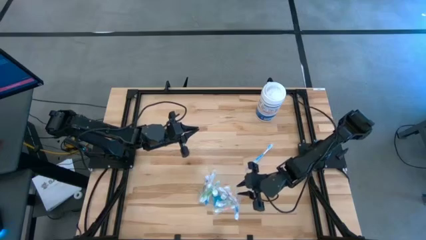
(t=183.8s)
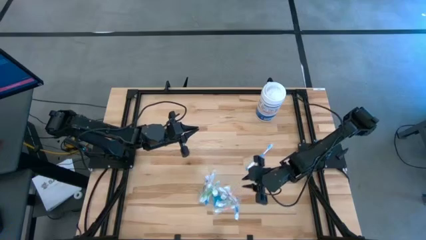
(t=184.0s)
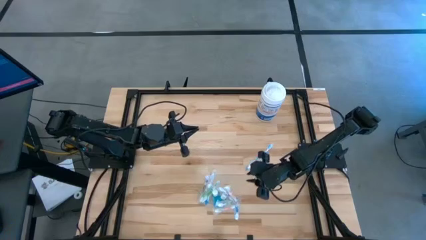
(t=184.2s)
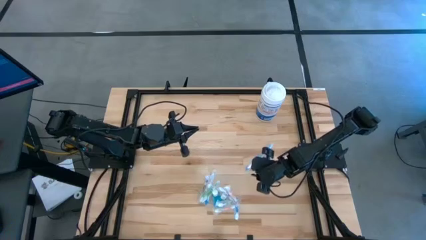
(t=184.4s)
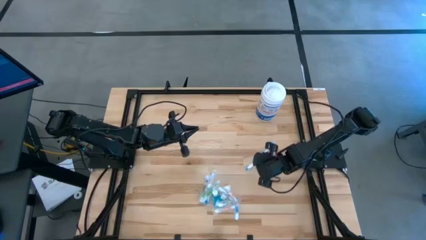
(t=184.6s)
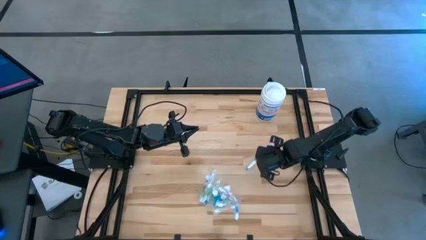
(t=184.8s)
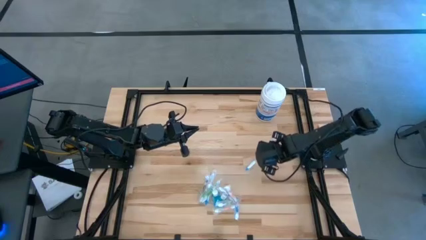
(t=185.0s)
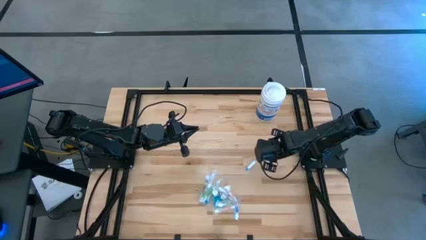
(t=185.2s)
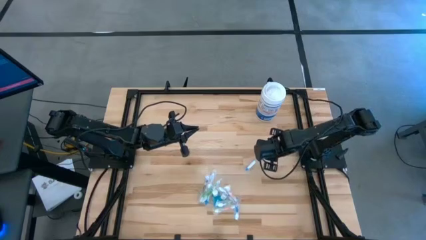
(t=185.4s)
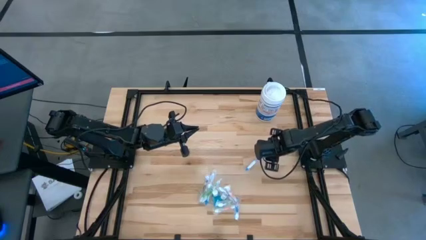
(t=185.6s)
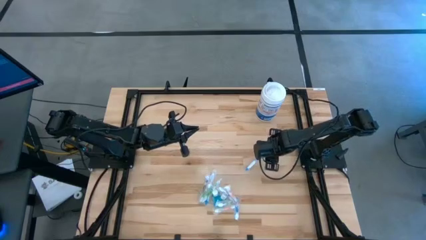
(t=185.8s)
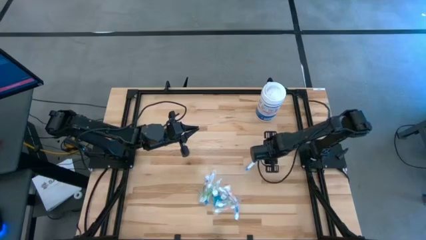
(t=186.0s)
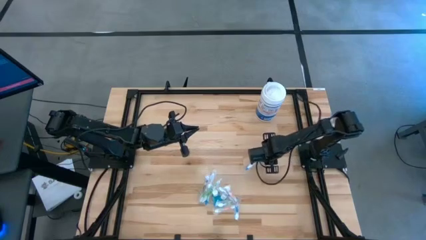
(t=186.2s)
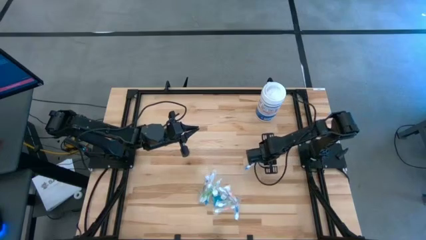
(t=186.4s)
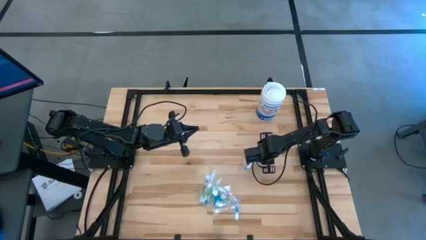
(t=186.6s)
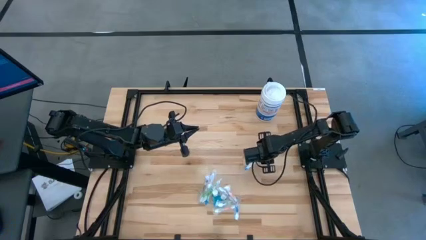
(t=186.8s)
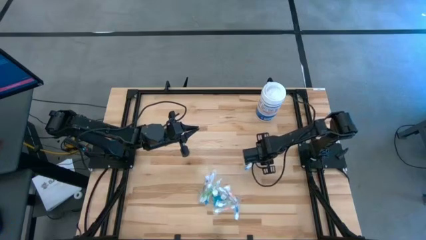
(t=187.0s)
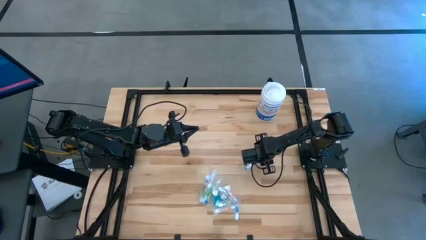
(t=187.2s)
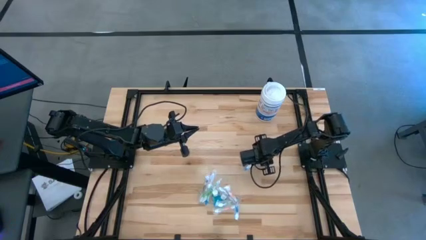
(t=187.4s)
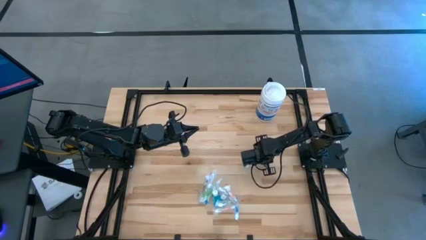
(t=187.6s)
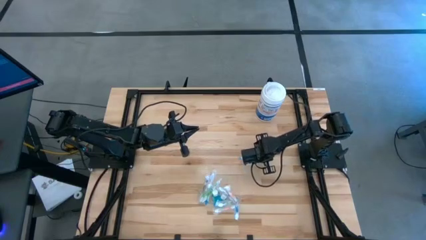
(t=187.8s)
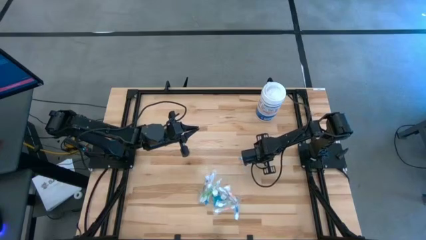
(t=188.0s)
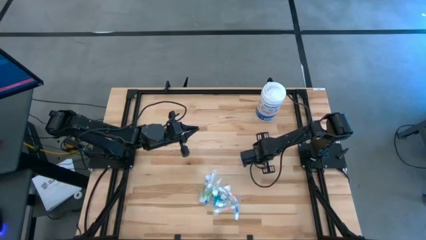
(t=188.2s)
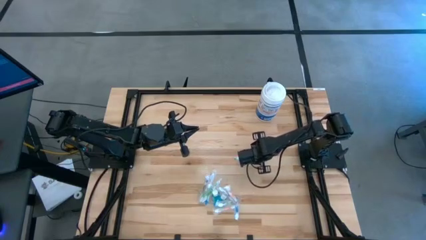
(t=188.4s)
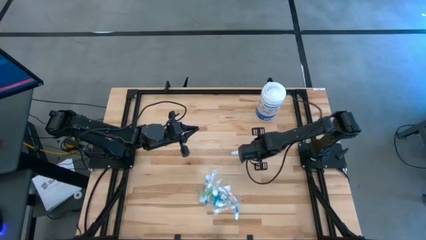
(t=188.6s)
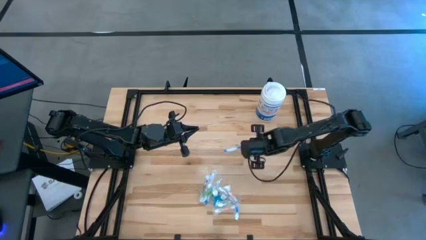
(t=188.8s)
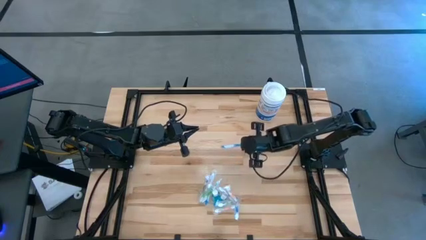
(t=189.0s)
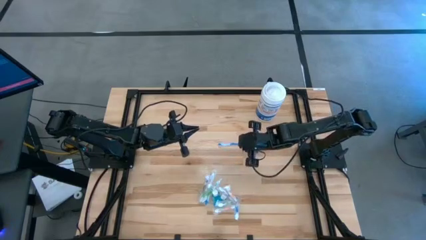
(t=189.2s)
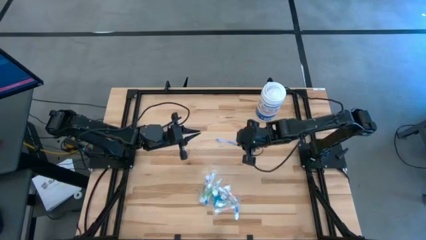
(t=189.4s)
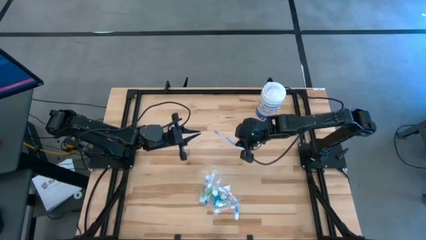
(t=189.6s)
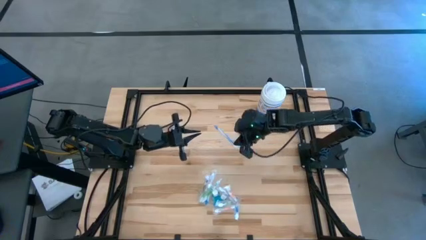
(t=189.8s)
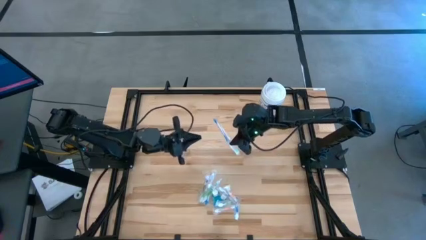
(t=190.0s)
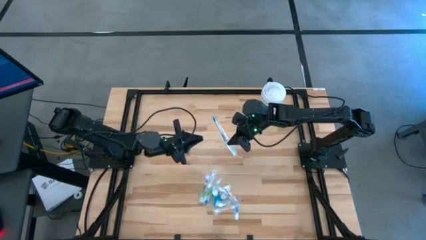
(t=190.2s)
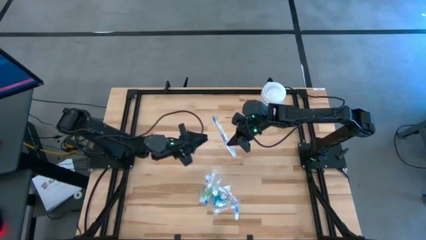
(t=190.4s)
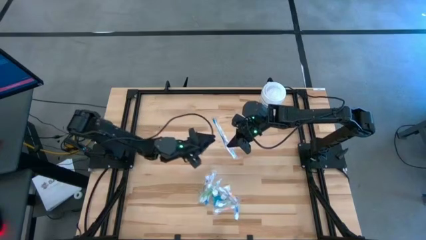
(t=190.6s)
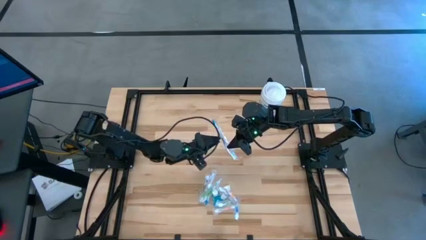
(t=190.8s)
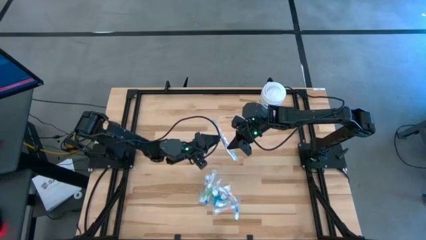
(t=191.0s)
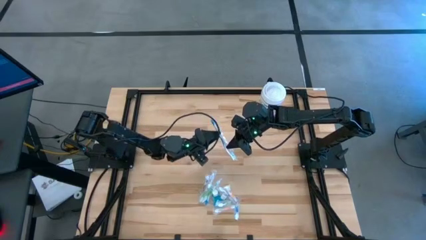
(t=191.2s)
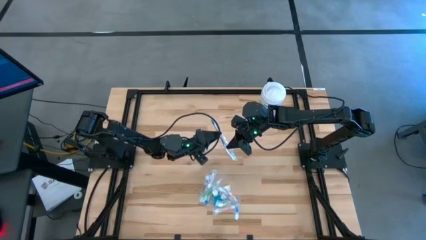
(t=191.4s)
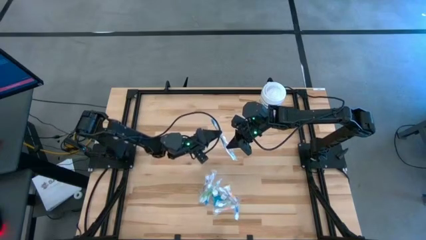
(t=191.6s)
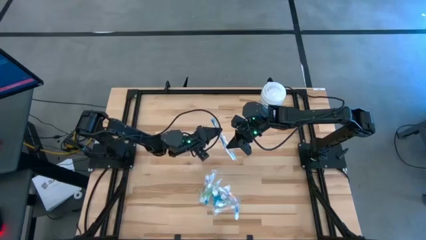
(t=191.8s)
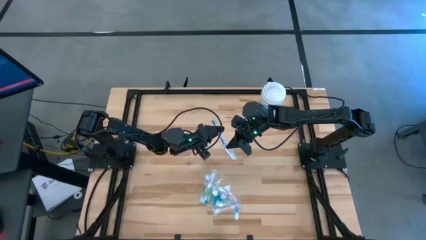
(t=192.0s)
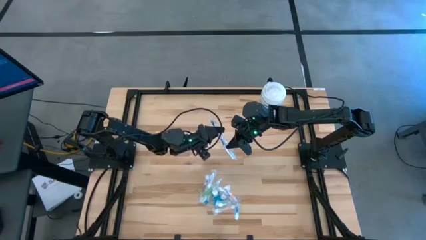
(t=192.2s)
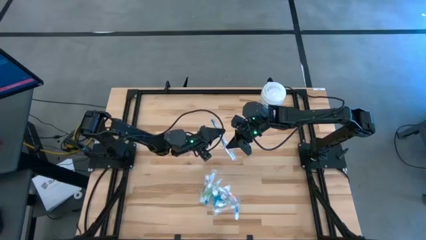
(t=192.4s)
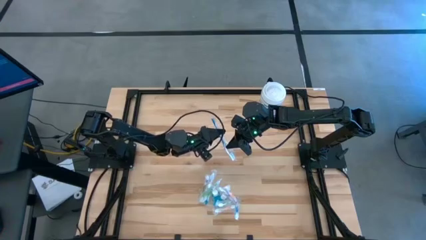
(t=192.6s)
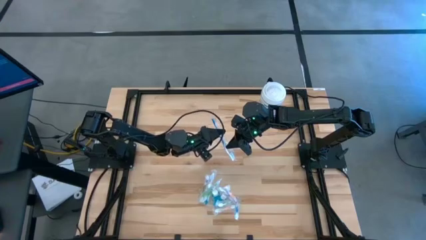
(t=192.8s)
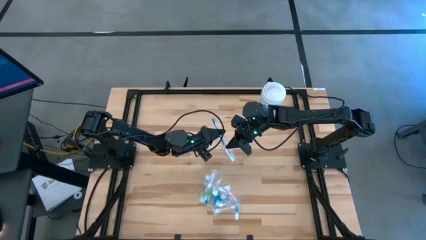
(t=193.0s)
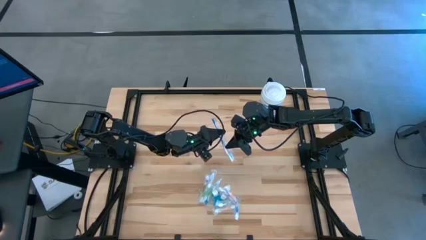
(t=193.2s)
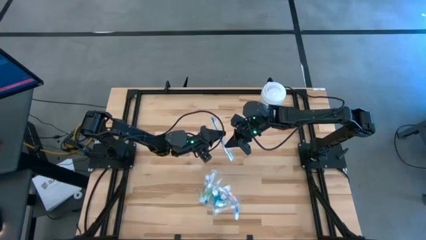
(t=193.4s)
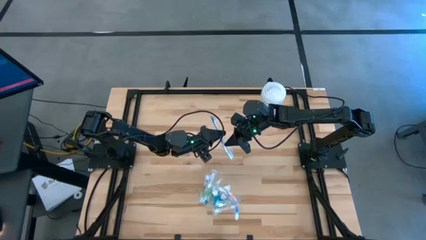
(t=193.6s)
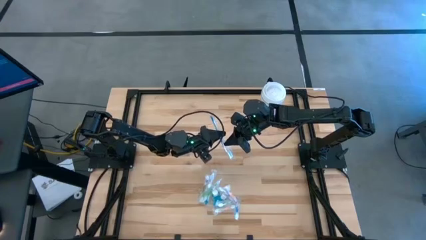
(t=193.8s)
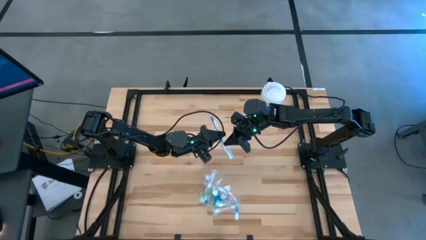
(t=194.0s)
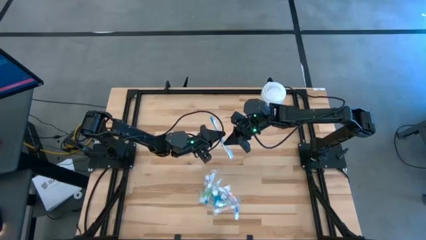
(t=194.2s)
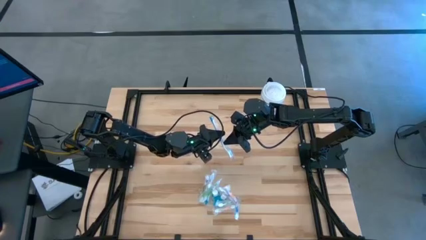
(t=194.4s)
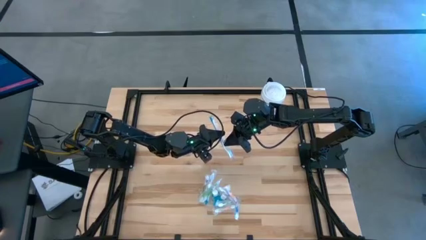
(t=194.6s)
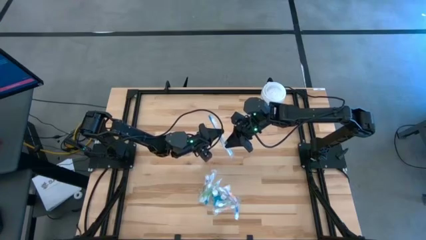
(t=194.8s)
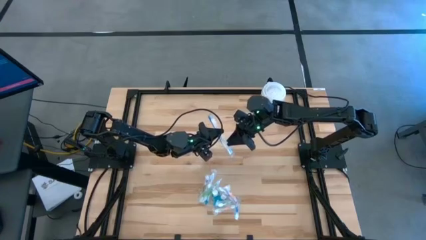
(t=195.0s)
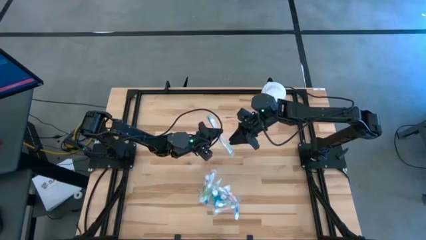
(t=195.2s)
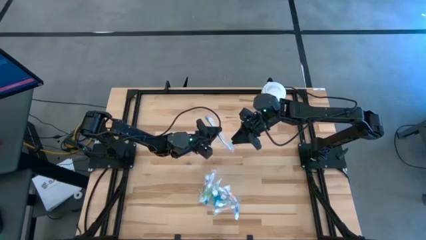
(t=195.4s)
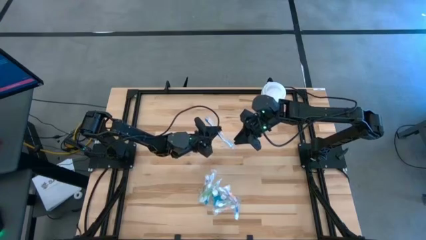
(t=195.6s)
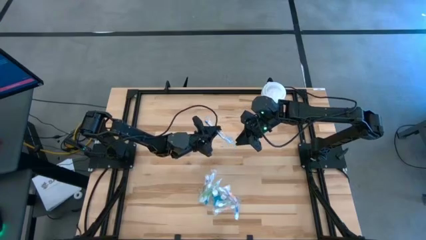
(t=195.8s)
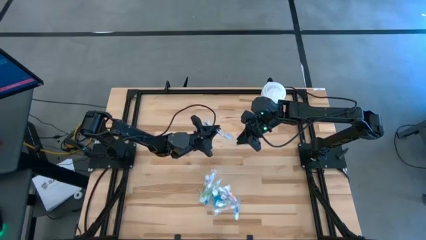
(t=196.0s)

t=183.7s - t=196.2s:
Task: Pick & Place toothbrushing station
Put the blue toothbrush into the transparent organizer

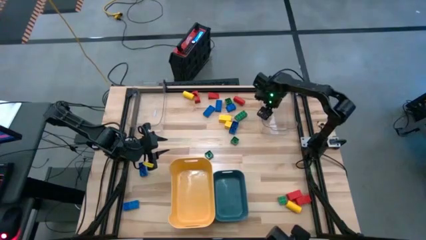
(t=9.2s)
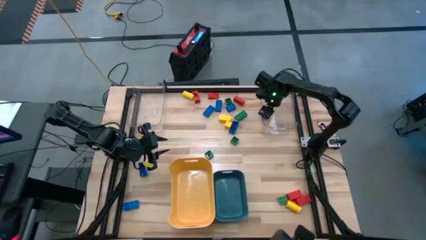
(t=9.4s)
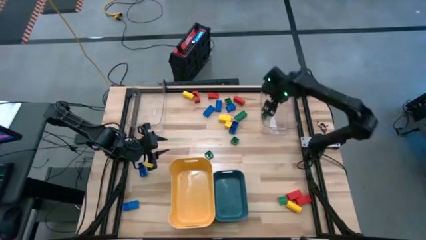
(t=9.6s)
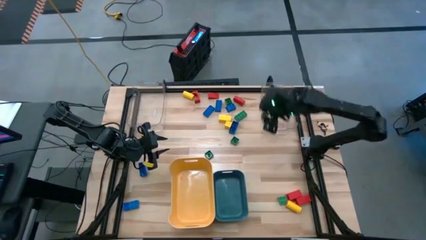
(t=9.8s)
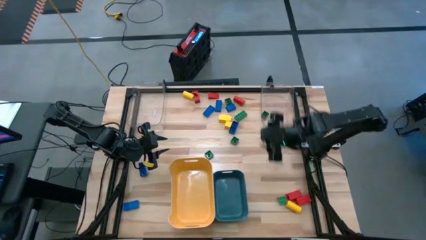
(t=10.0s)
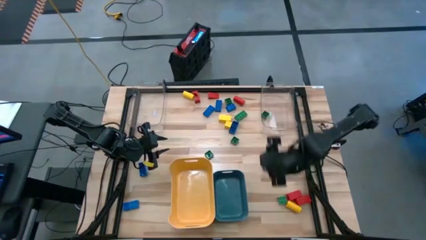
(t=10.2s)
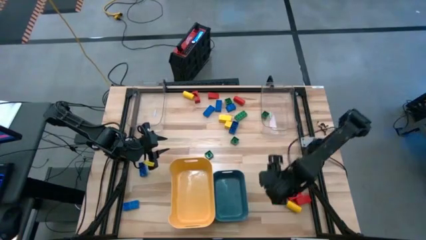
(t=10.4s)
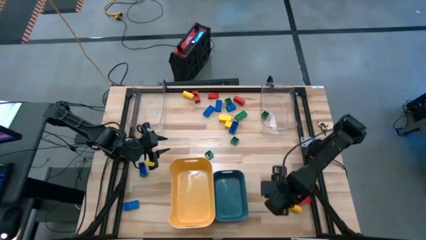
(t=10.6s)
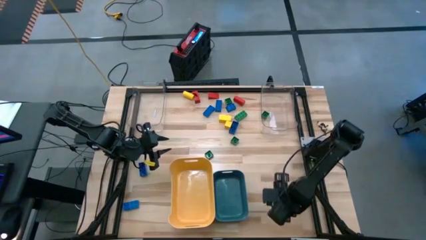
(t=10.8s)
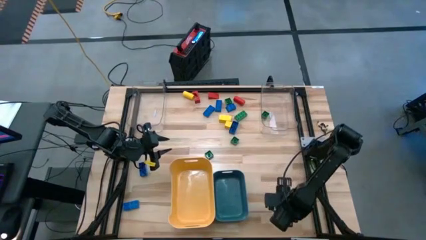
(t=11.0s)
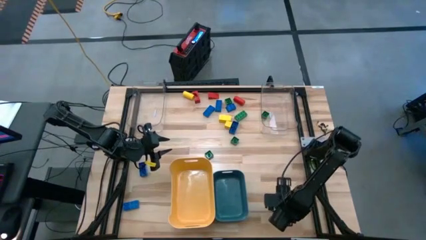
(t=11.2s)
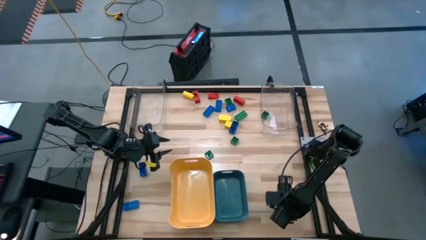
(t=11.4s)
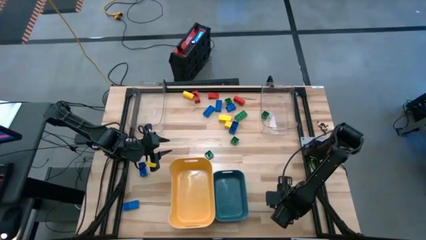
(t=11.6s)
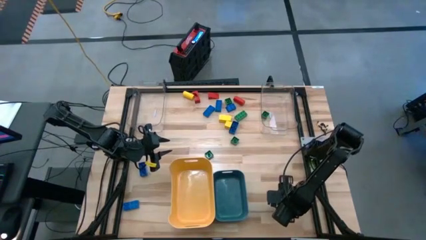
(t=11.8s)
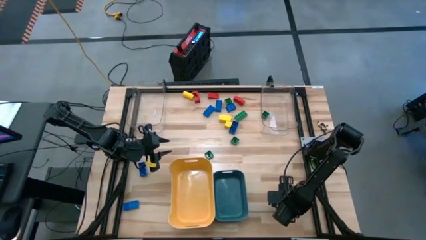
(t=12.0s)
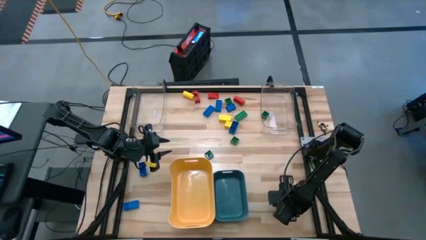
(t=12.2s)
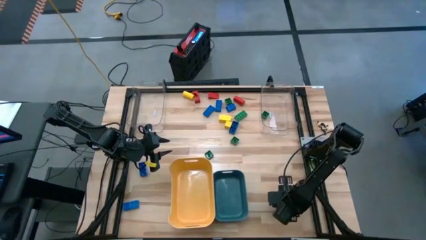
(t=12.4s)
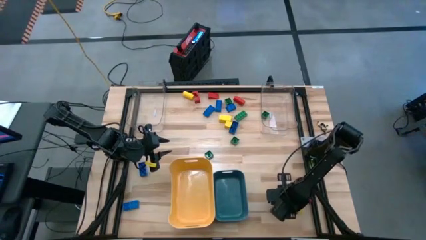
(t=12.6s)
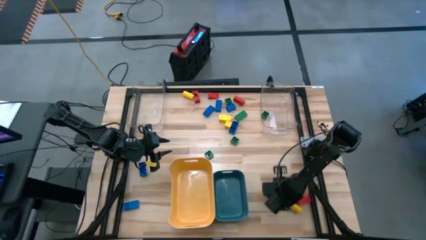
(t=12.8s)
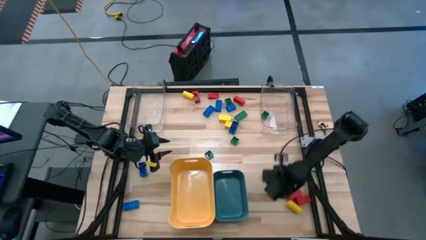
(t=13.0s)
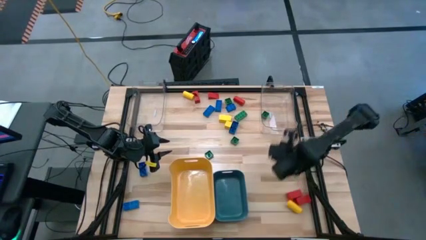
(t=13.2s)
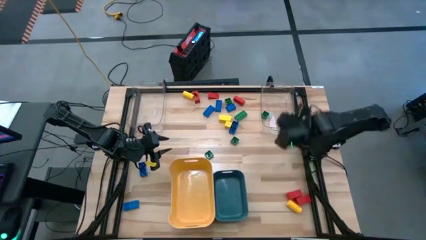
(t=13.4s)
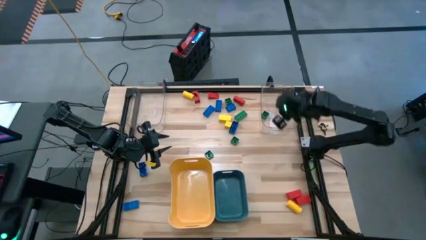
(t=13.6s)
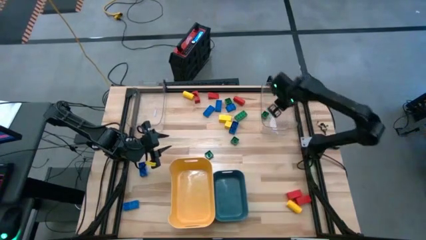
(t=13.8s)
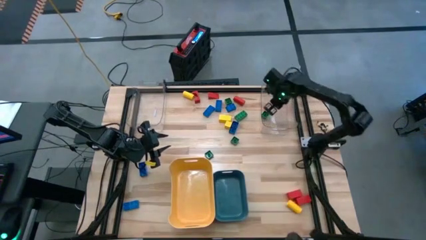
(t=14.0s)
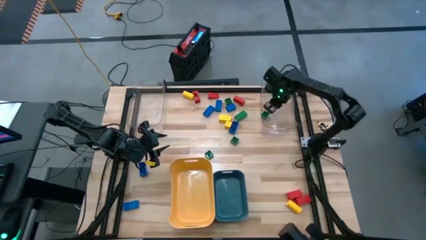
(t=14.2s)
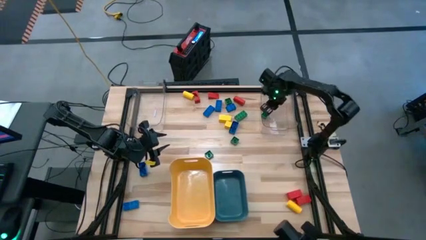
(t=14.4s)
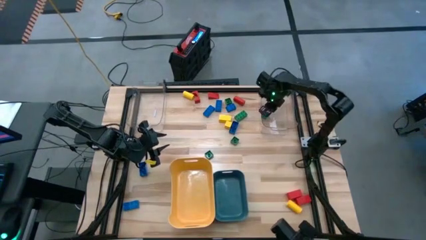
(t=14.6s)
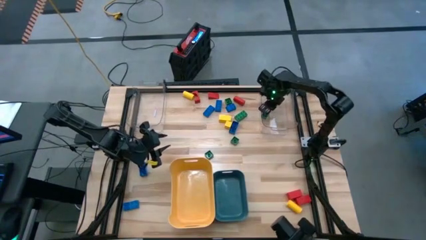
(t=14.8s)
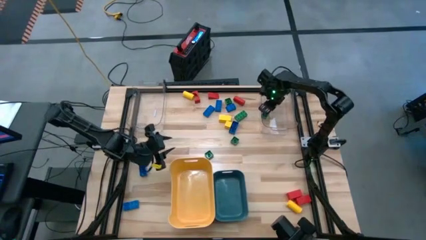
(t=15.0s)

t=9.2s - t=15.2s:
Task: Sort blocks
Put the green game piece into the right transparent bin
